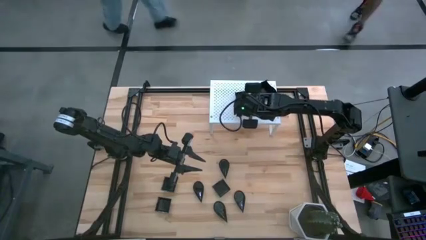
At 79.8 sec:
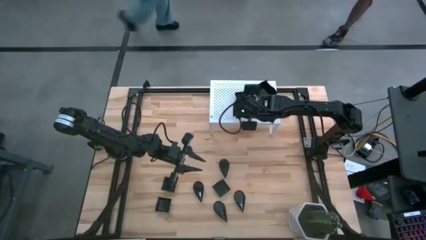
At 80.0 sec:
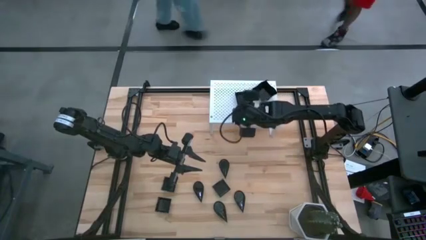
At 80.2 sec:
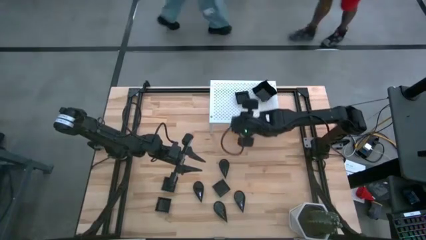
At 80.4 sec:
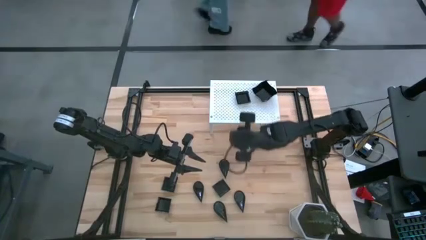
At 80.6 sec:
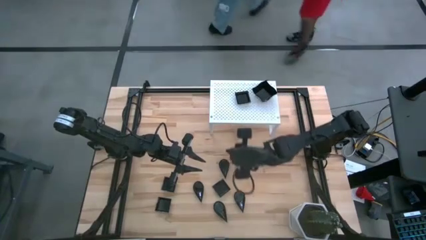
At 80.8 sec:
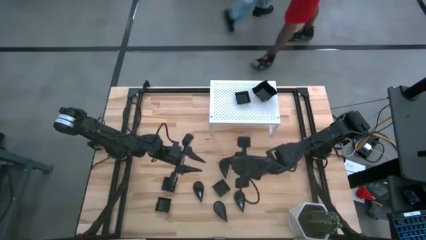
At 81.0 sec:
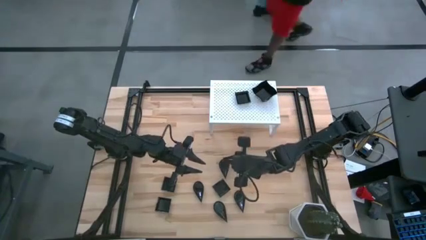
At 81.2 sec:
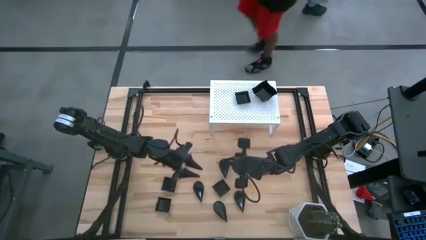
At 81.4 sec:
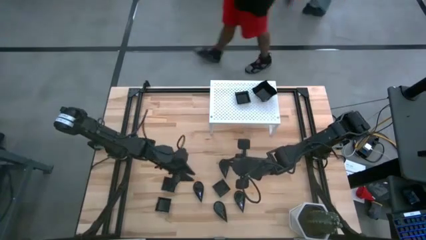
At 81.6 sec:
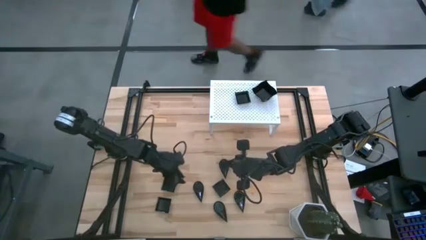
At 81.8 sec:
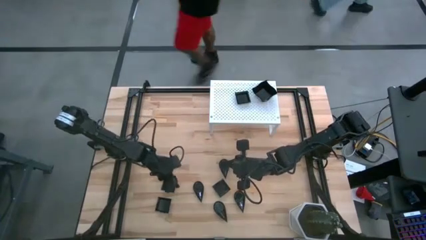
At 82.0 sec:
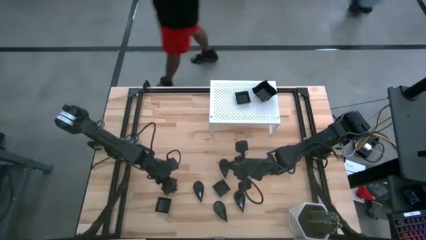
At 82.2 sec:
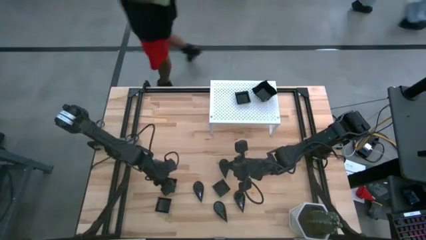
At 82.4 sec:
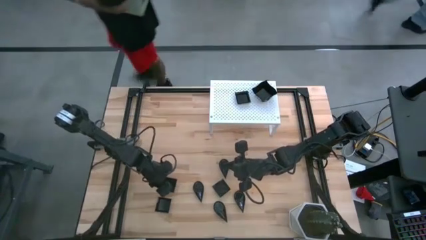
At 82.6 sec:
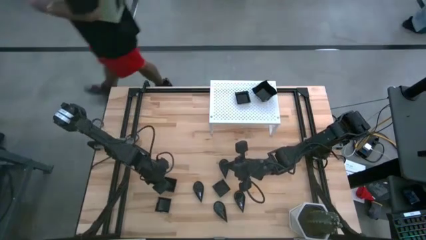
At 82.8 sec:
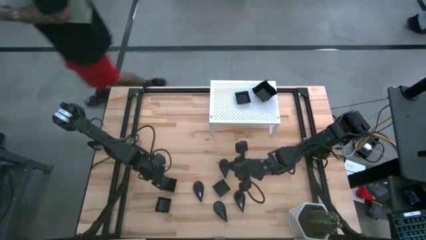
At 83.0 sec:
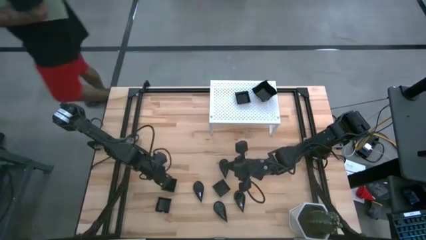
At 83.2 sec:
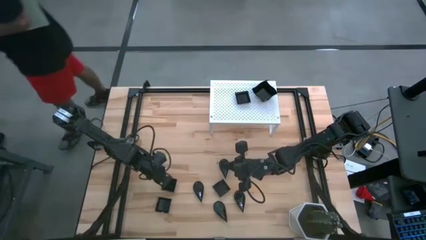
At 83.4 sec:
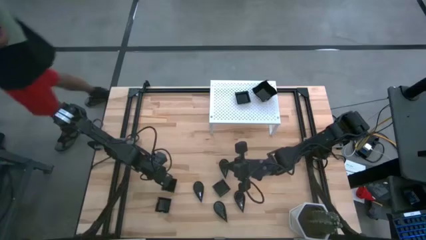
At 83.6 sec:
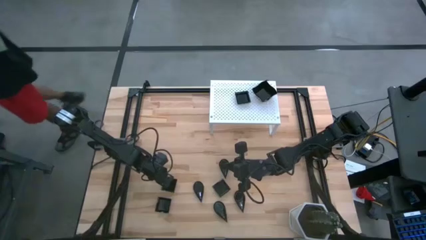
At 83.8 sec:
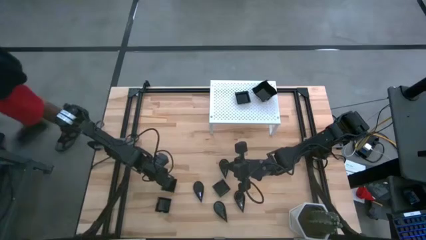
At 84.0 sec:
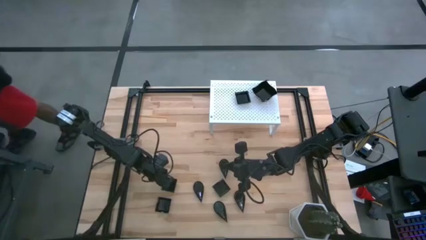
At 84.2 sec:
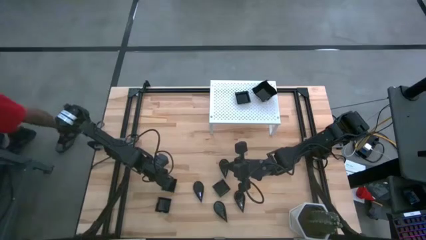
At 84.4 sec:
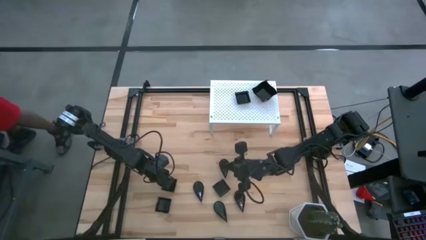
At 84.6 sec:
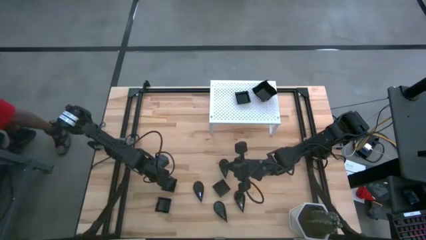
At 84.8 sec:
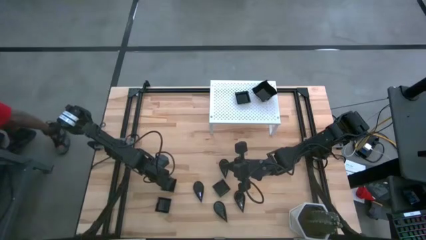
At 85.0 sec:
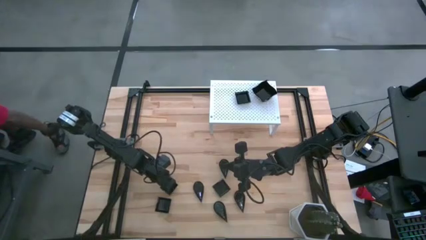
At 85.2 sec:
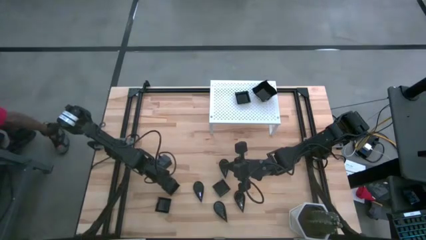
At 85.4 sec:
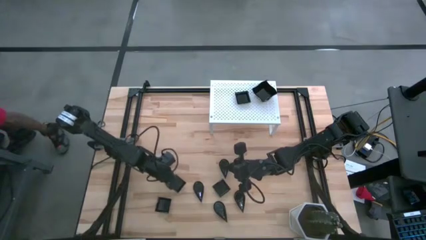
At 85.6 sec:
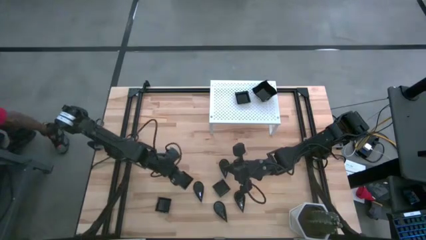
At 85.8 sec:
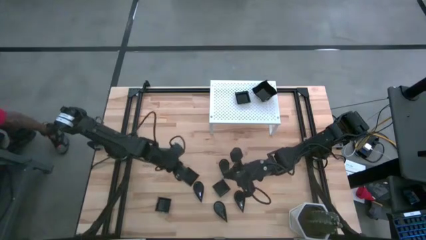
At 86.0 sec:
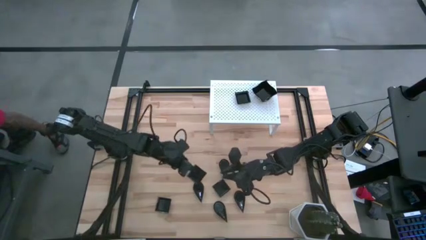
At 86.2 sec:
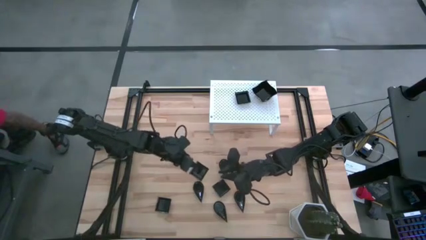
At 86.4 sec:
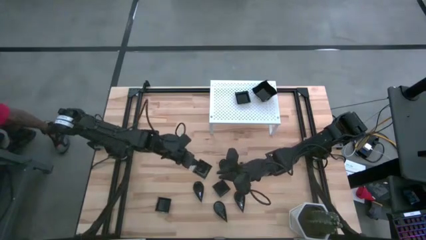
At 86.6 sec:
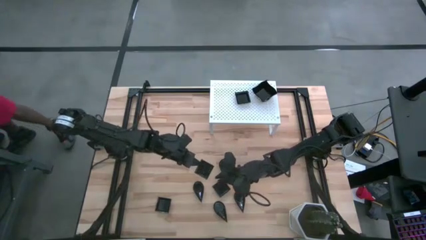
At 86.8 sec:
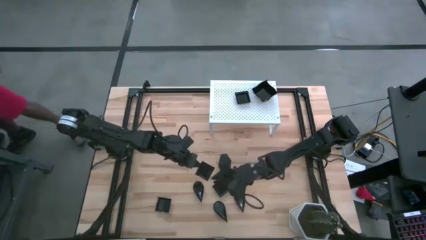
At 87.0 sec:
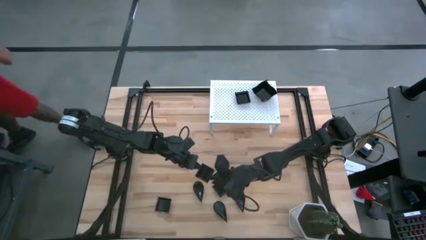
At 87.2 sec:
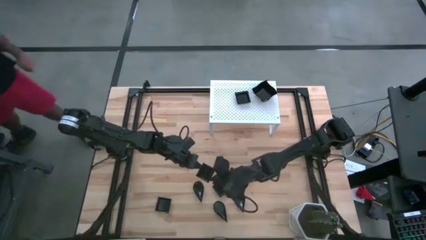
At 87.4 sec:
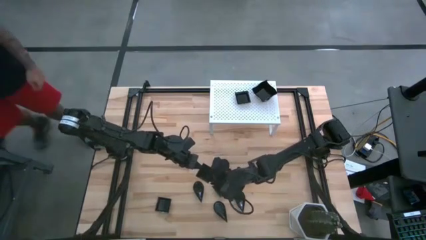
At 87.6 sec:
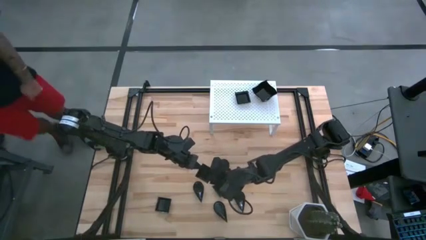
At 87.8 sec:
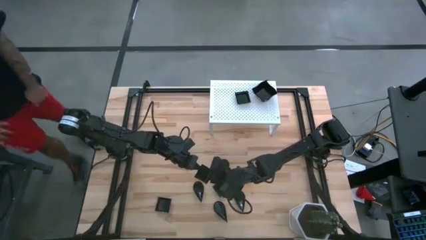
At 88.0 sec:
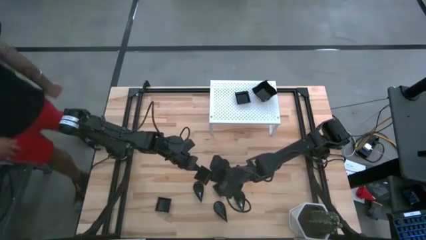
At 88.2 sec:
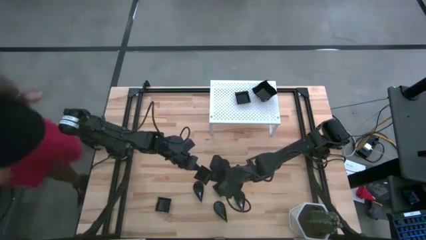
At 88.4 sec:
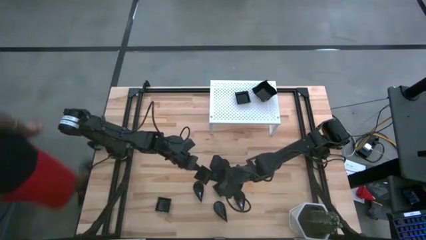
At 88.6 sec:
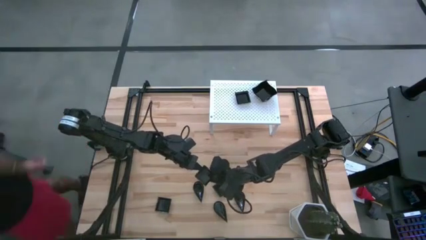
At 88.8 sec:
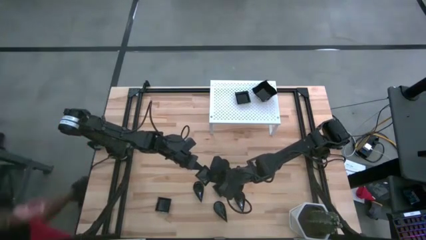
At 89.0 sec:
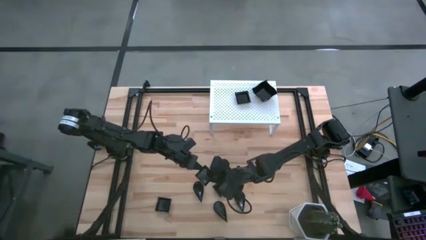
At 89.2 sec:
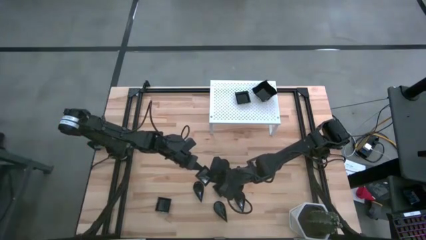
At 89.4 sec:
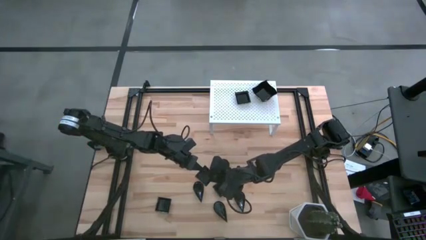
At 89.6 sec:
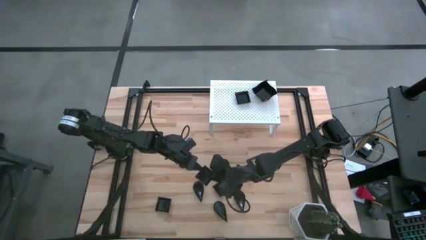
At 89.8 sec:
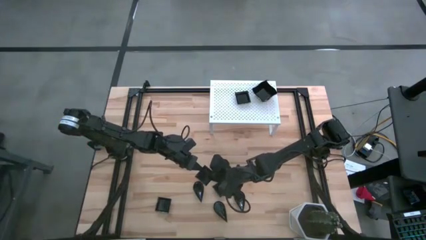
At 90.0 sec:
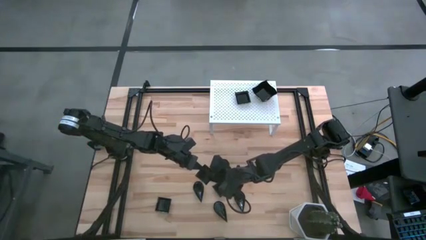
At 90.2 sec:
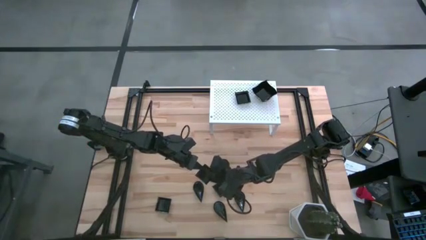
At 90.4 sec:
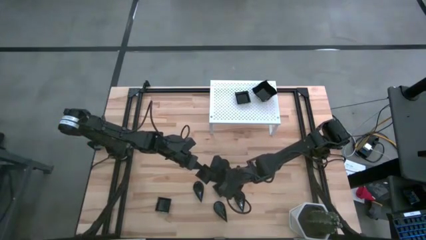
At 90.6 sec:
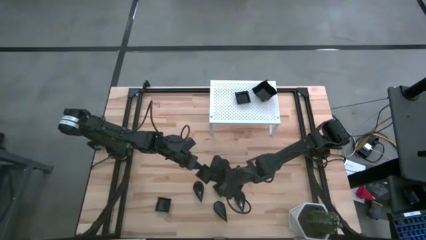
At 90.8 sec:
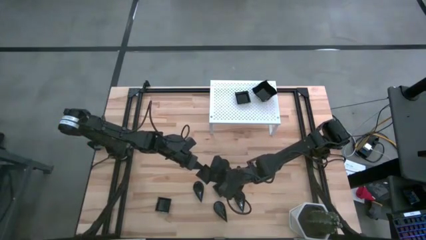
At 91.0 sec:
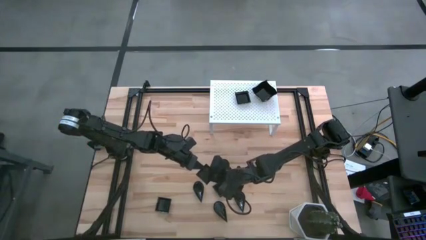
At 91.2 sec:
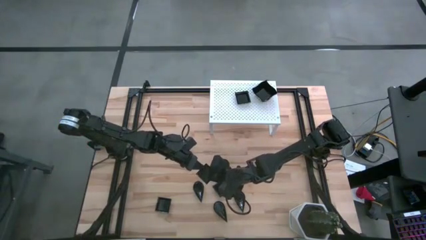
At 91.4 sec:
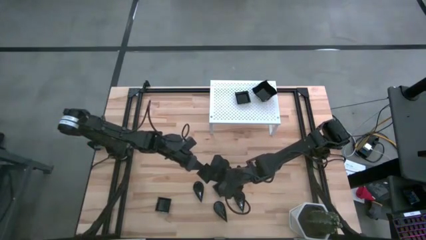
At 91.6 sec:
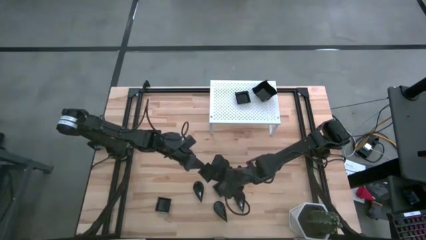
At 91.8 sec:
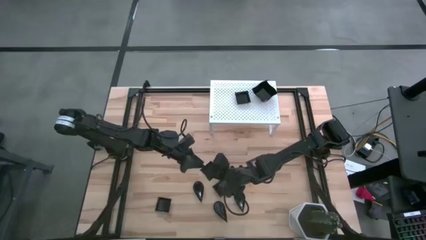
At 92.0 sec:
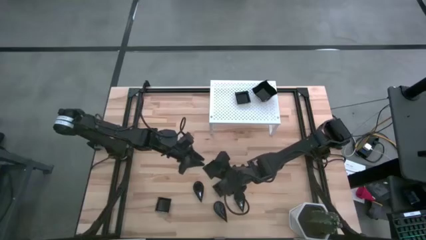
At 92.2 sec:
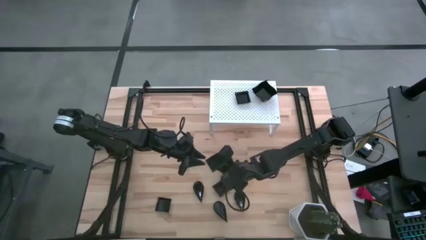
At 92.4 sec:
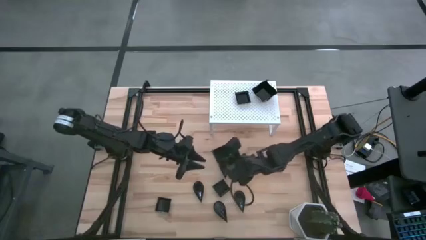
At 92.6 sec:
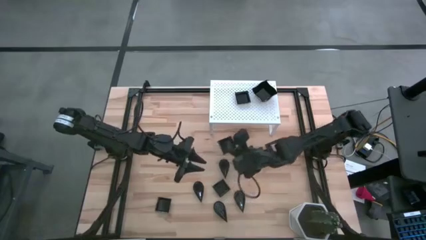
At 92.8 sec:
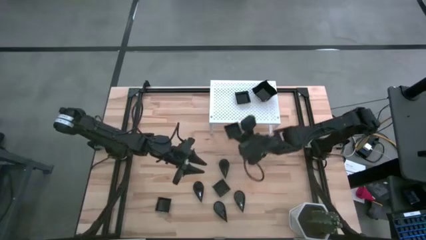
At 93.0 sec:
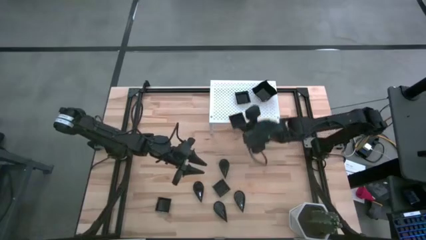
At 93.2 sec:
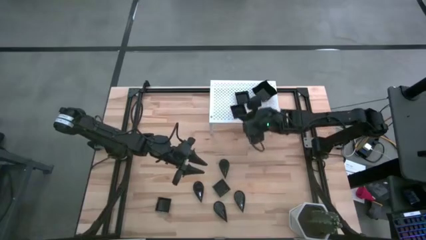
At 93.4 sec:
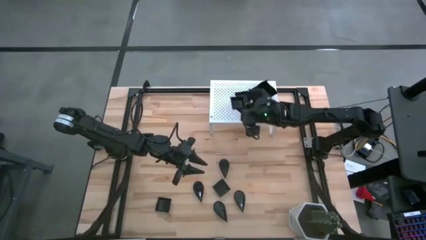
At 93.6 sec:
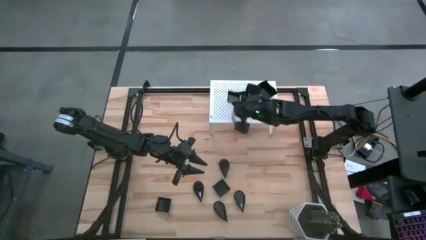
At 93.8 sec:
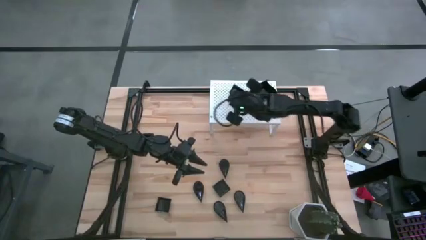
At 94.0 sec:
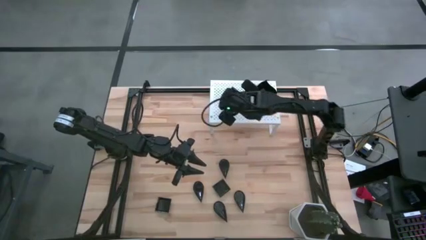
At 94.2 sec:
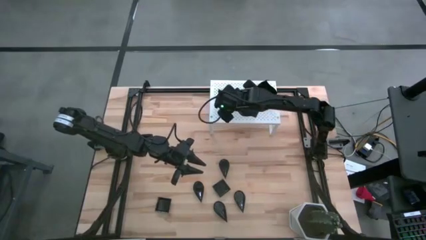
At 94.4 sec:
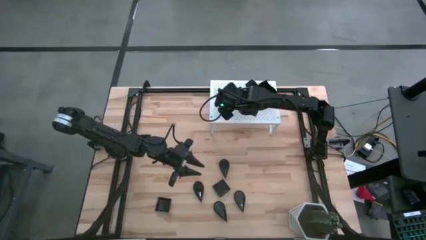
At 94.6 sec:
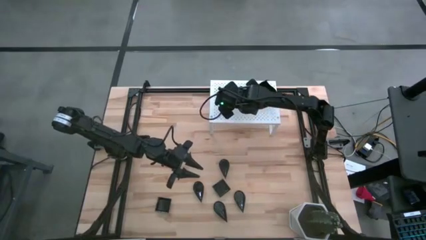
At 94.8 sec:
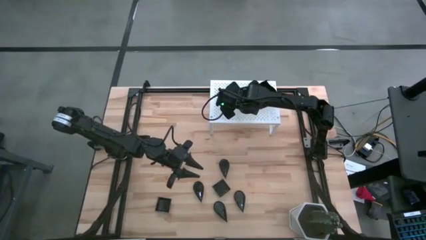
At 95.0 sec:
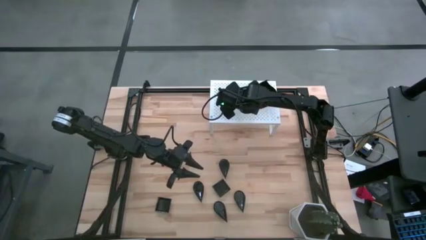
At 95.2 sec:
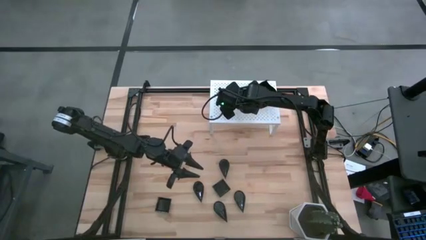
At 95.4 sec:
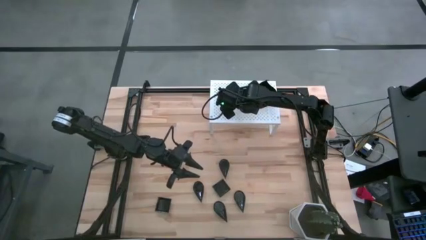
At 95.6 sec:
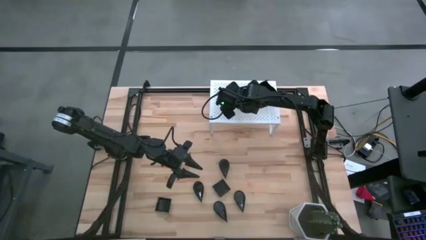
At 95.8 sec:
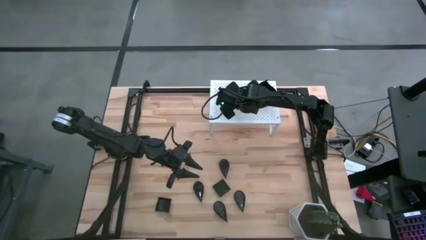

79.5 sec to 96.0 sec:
Task: Pick & Place Mini shaped plates
Stack the square plate on top of the square plate on the shelf
